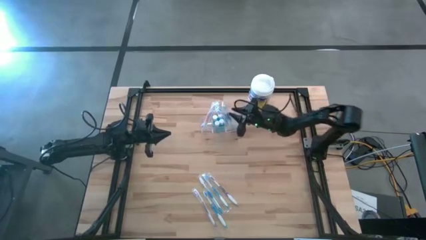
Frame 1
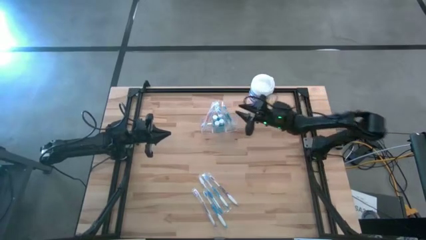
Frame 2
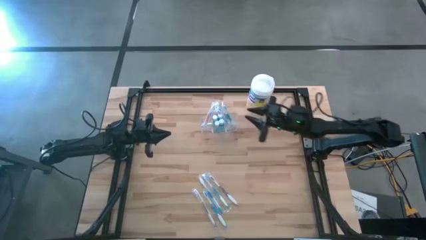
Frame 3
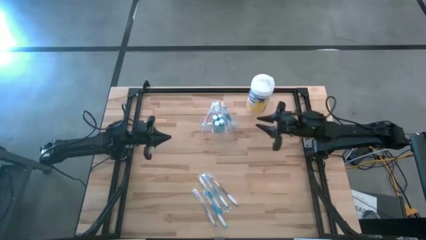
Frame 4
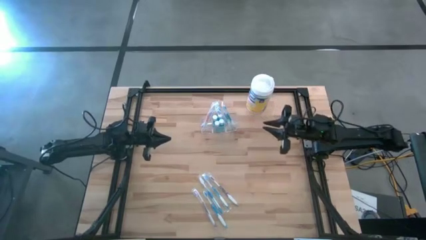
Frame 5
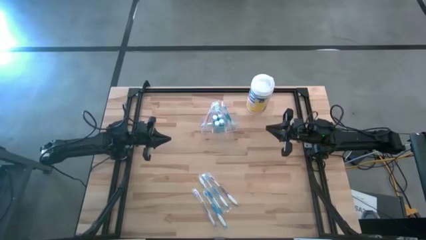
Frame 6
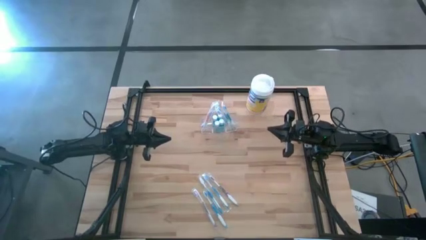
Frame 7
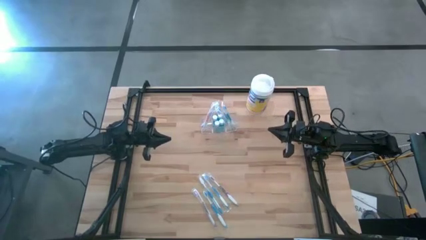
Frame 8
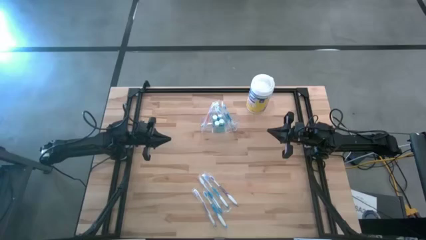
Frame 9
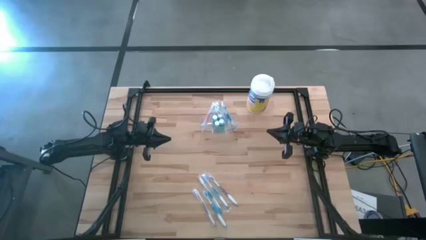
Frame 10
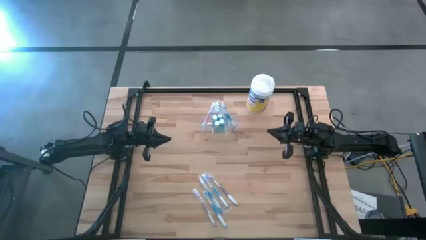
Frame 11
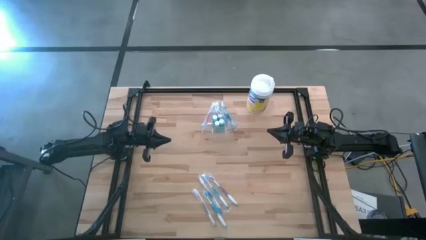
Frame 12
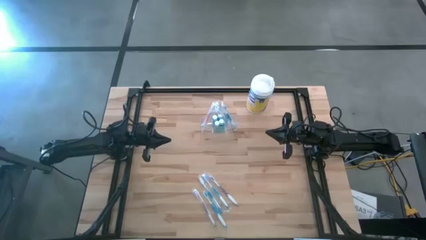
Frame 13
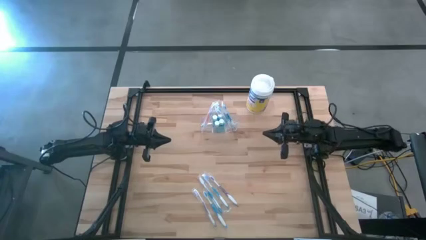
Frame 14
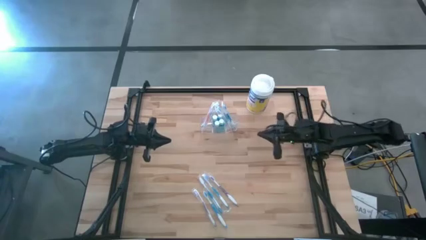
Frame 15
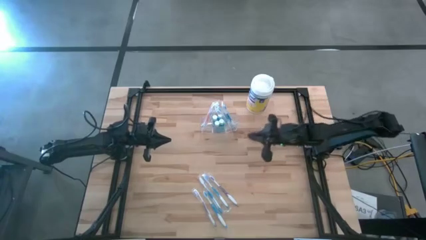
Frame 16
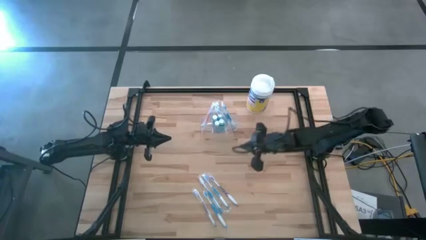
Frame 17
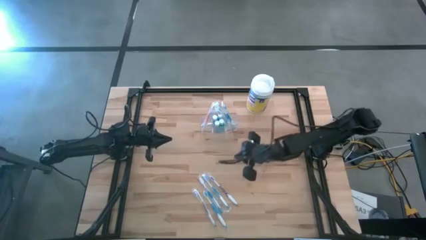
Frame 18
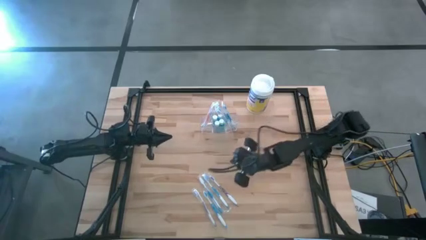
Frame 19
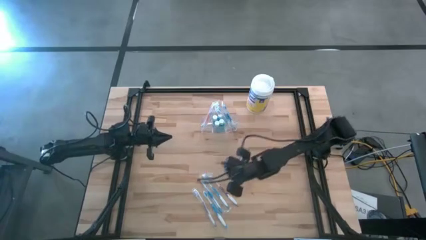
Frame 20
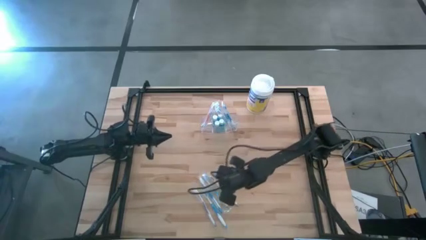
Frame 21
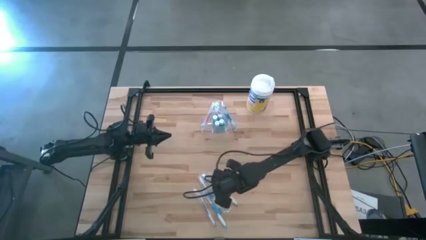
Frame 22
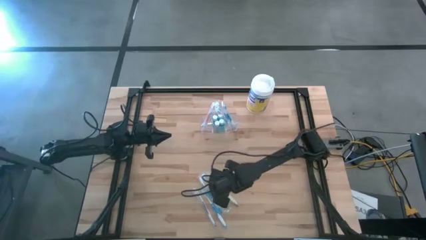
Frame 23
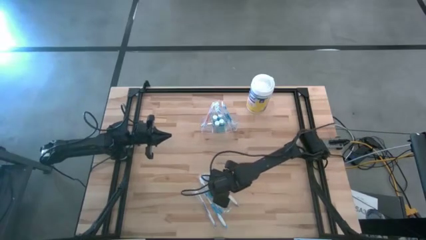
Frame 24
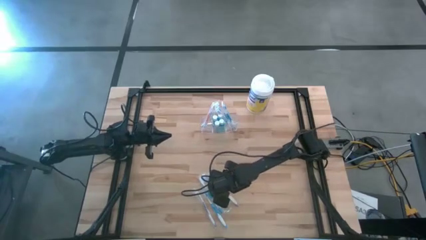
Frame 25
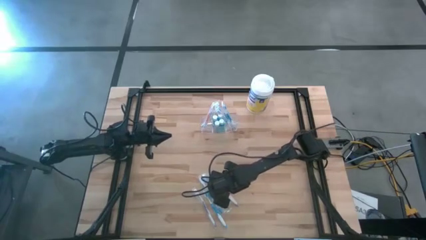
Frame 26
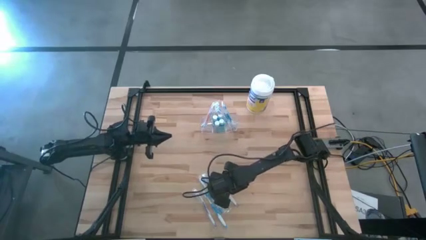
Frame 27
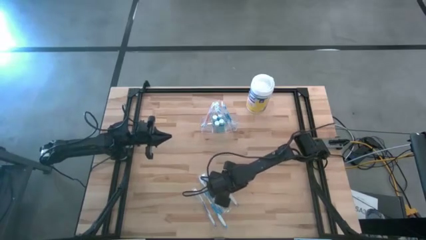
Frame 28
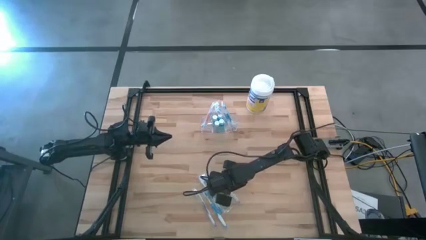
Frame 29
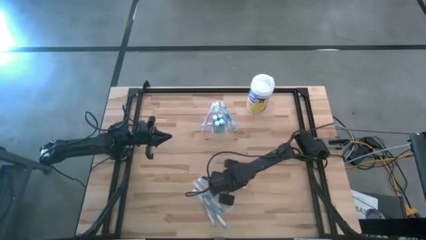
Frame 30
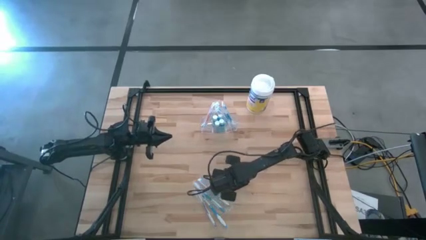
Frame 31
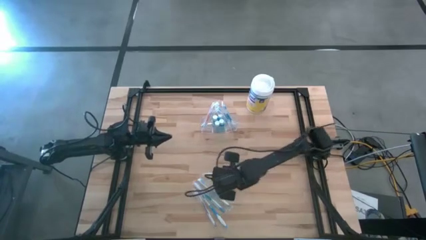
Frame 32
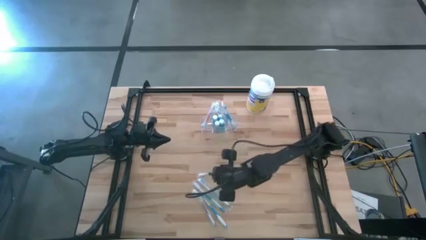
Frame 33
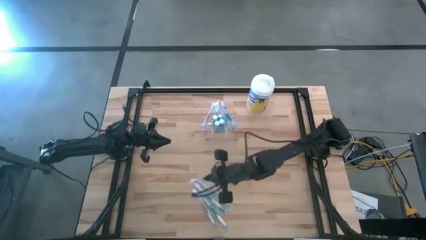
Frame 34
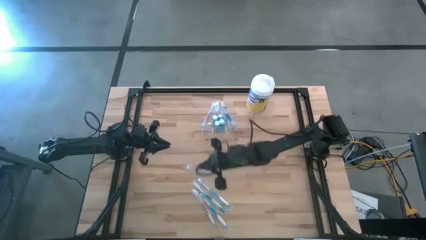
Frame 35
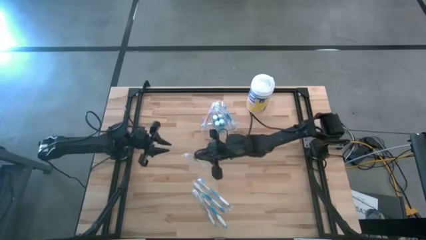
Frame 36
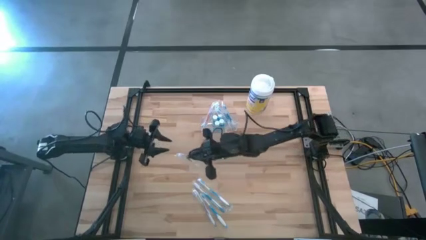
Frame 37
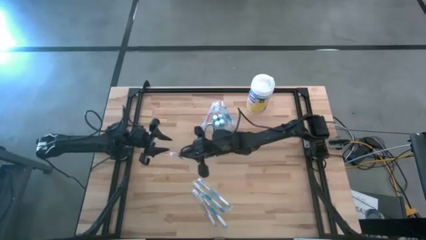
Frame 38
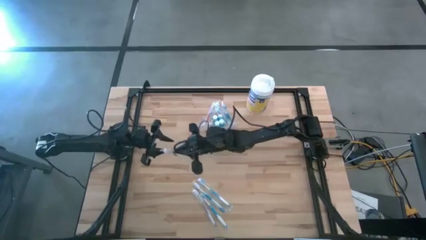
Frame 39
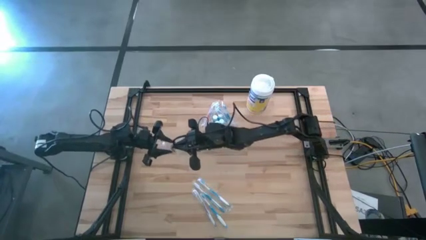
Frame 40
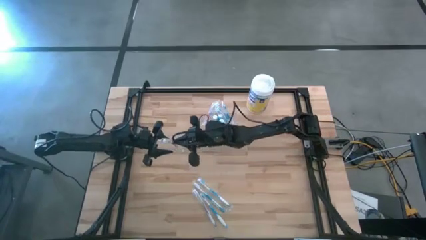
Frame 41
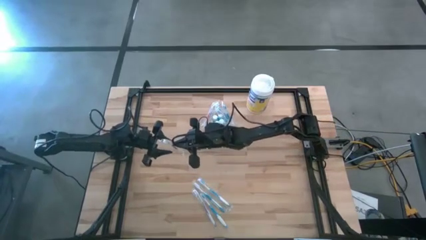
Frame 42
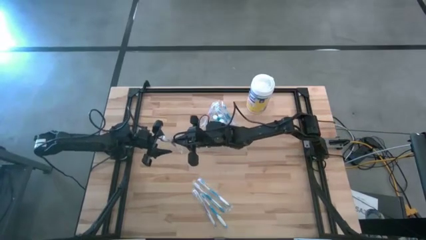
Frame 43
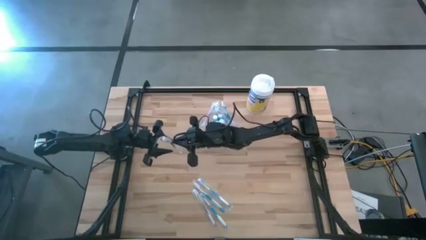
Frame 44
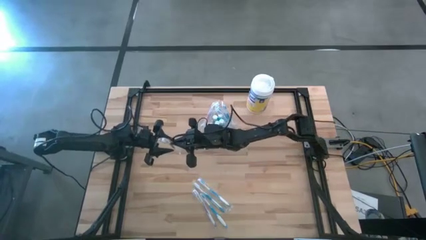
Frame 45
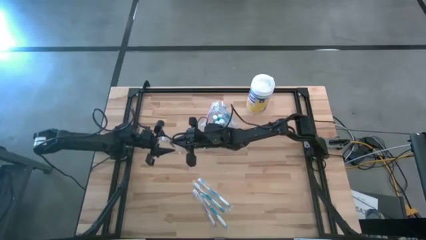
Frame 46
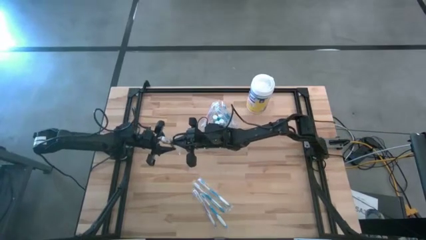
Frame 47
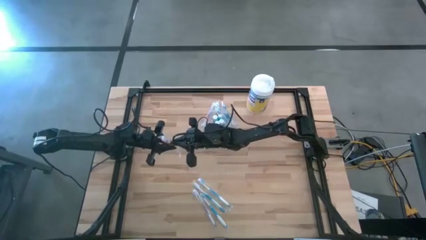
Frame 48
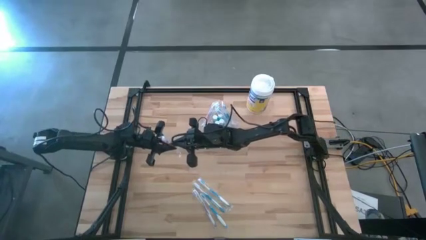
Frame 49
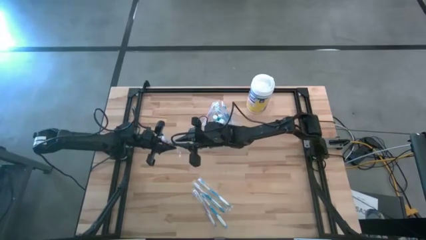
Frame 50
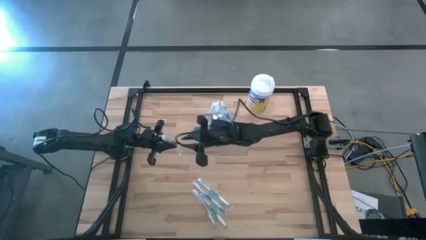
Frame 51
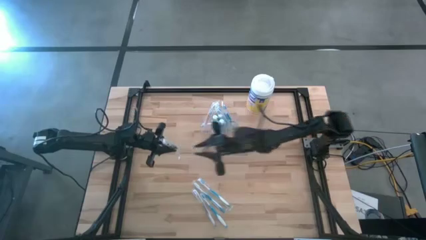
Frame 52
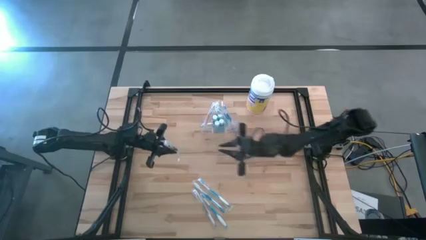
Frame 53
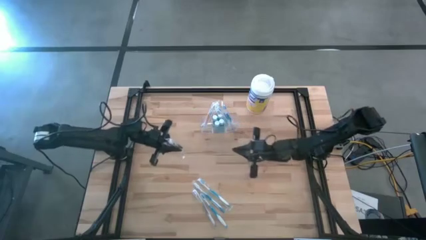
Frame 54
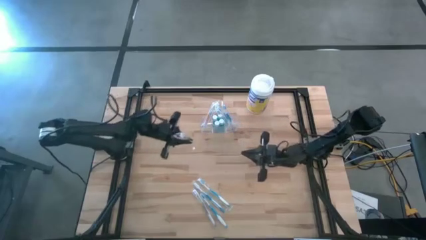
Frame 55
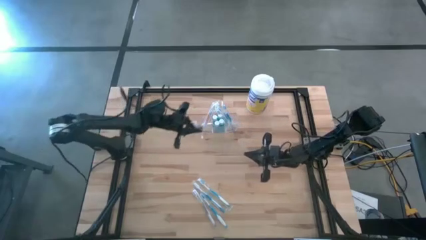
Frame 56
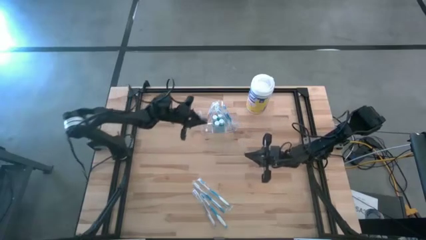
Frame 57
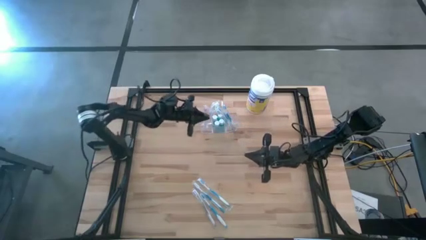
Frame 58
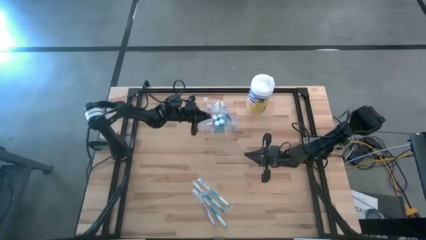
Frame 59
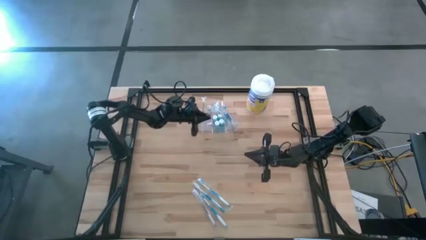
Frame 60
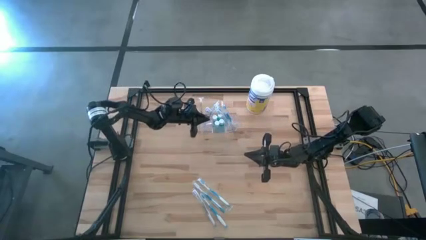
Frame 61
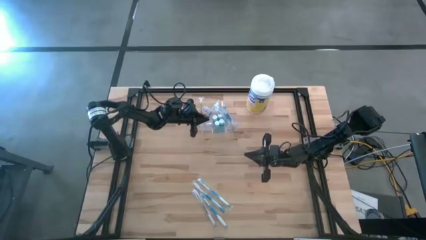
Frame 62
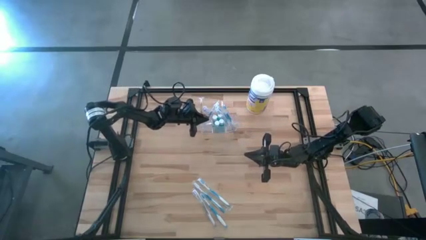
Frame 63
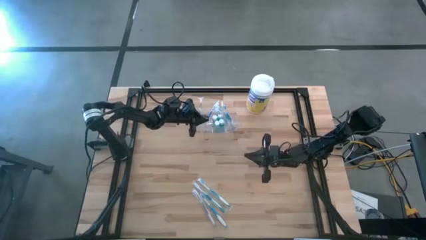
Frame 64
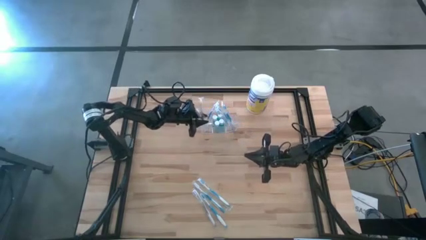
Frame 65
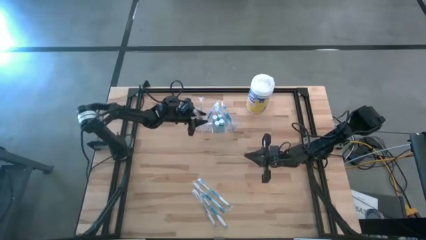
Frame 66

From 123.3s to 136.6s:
Task: Pick & Place toothbrushing station
Put the top violet toothbrush into the transparent organizer
